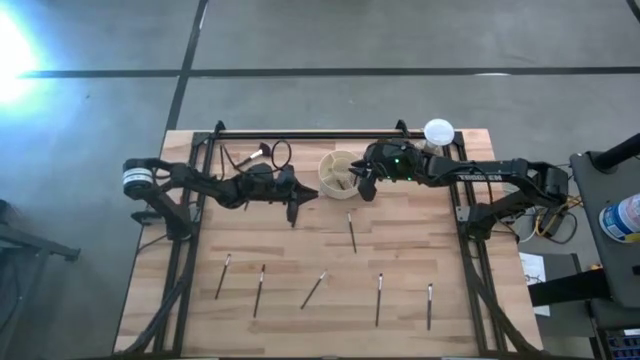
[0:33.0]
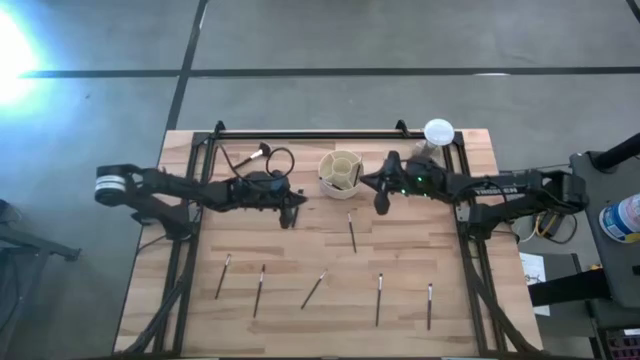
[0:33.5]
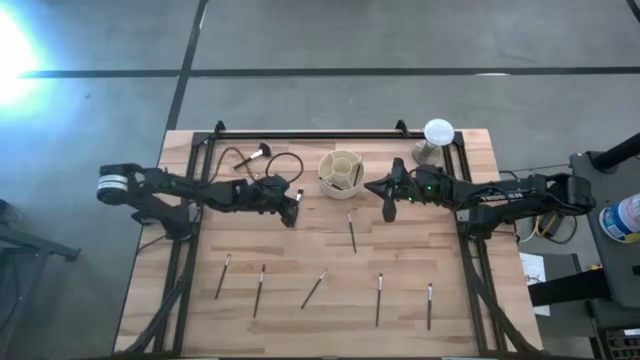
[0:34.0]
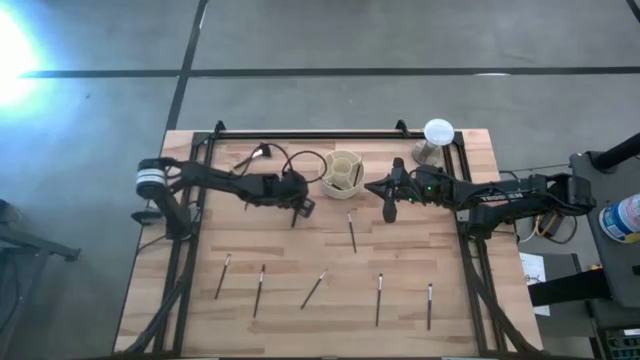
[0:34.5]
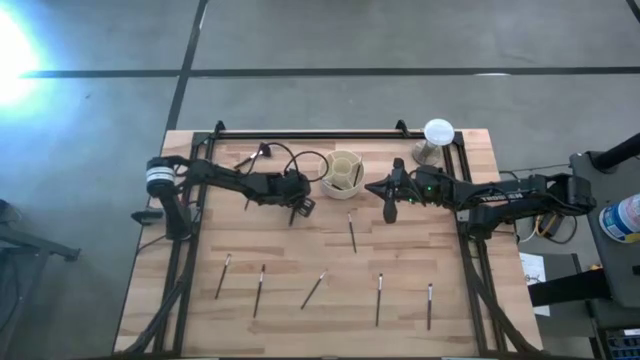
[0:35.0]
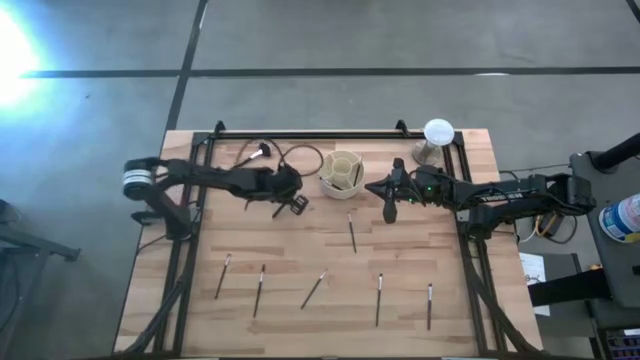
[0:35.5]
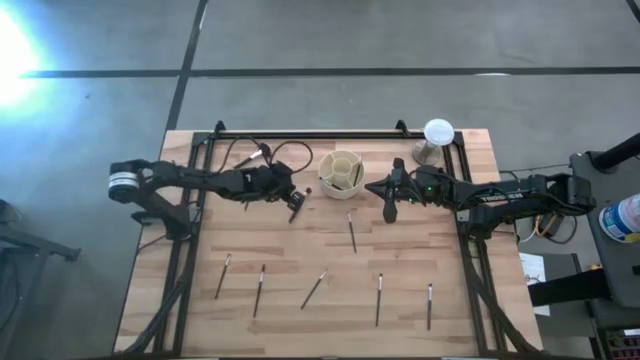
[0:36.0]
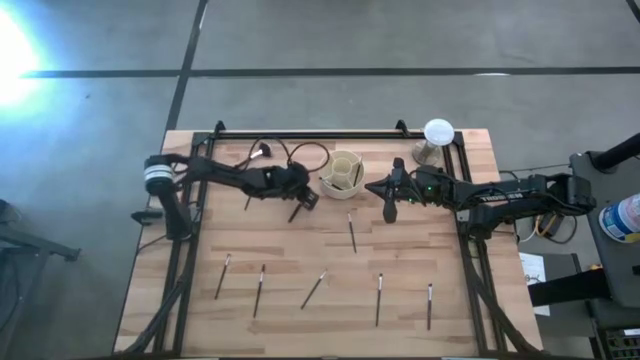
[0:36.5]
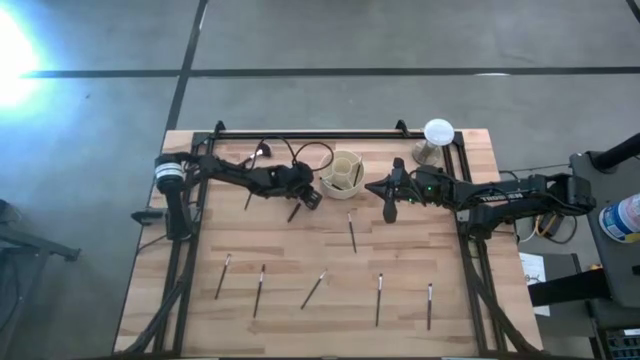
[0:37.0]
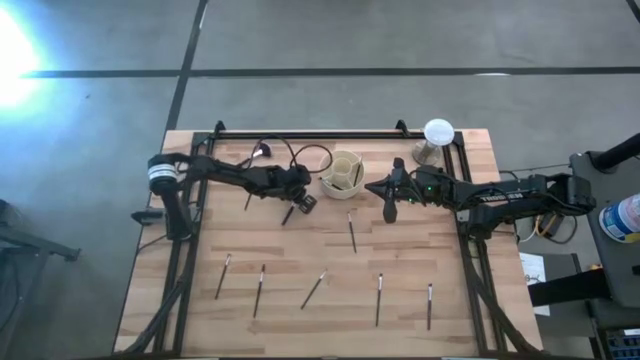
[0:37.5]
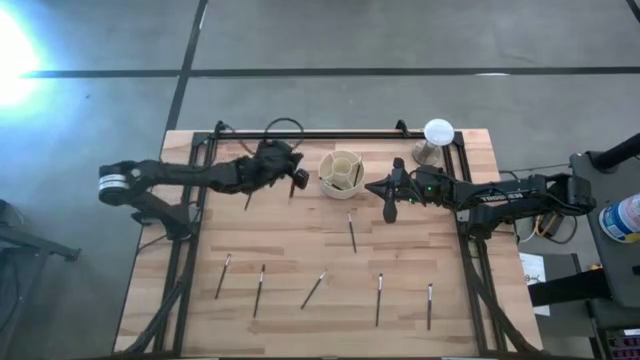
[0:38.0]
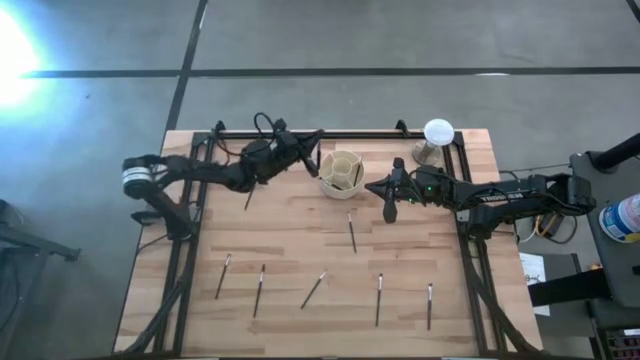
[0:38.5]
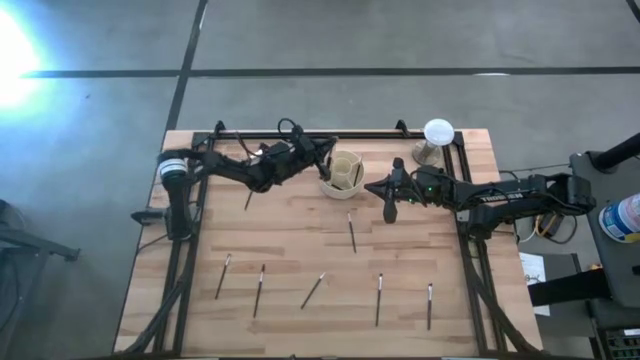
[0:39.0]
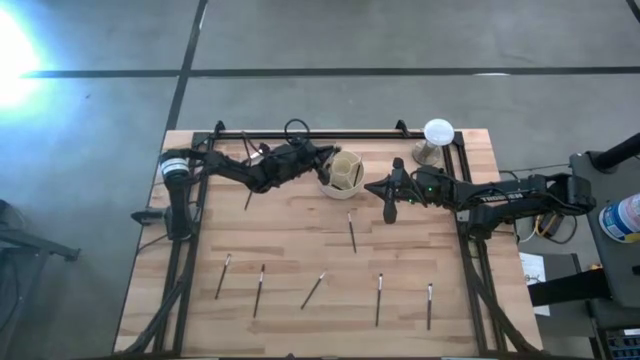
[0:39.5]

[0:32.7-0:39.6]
Task: Put items in baskets/containers
Put the black silver blush brush into the pen organizer

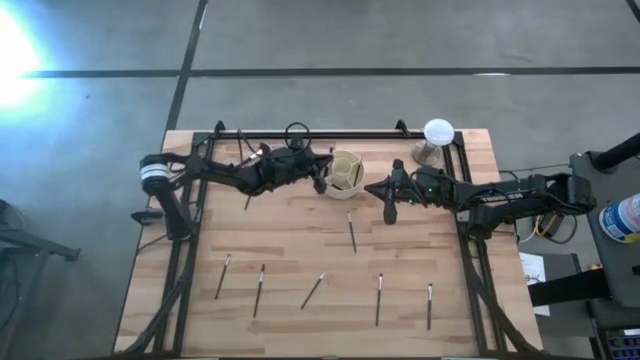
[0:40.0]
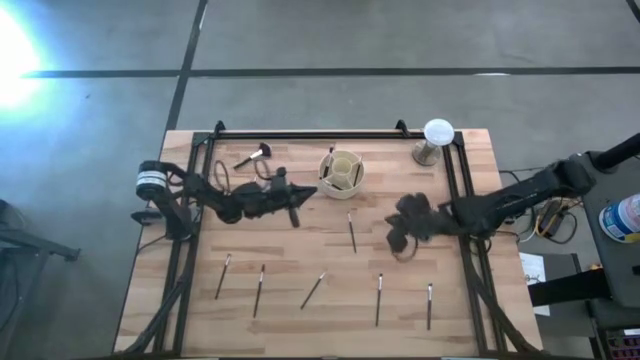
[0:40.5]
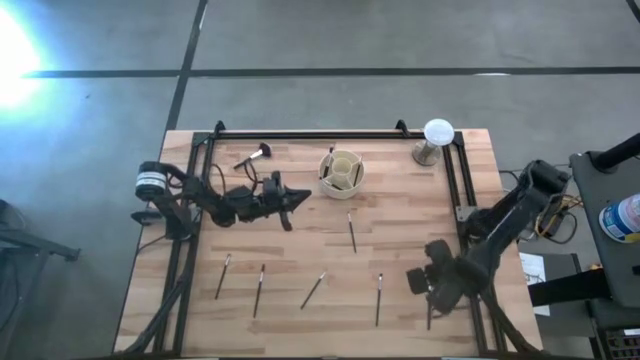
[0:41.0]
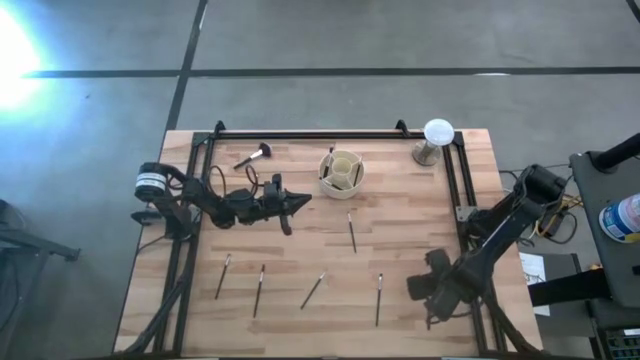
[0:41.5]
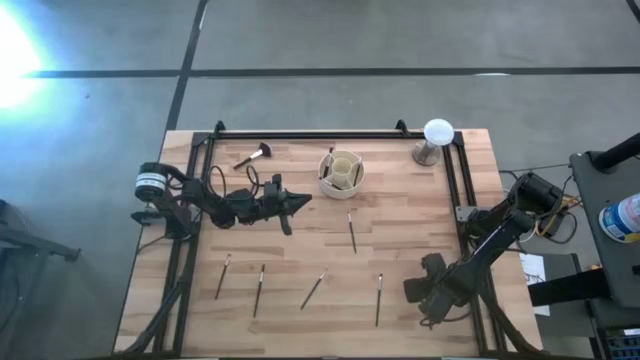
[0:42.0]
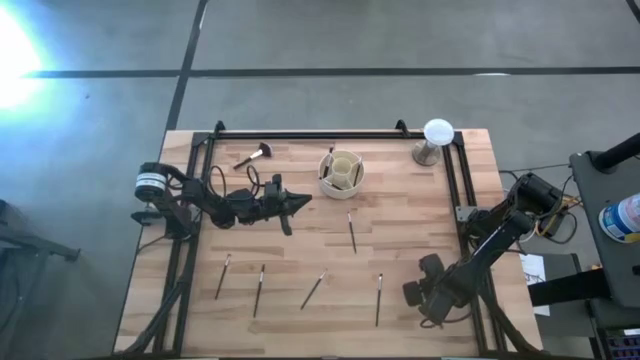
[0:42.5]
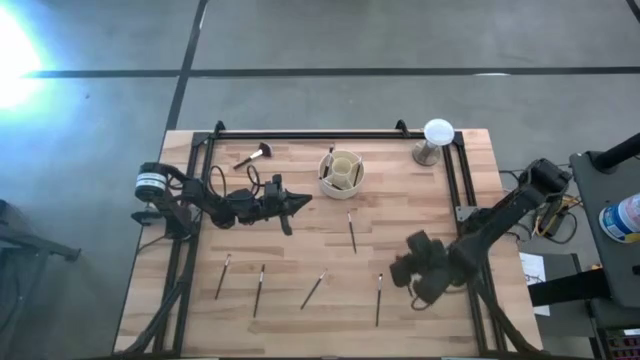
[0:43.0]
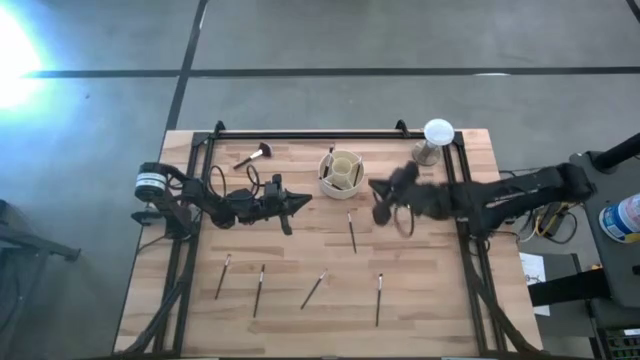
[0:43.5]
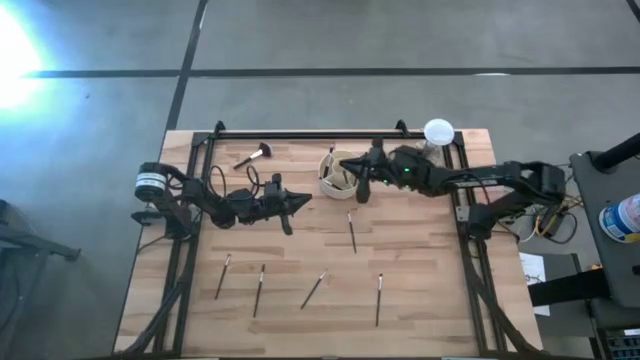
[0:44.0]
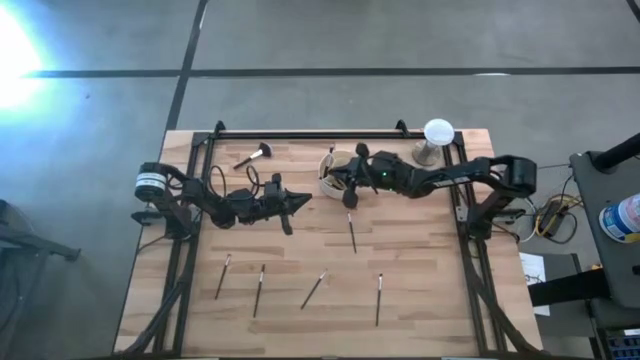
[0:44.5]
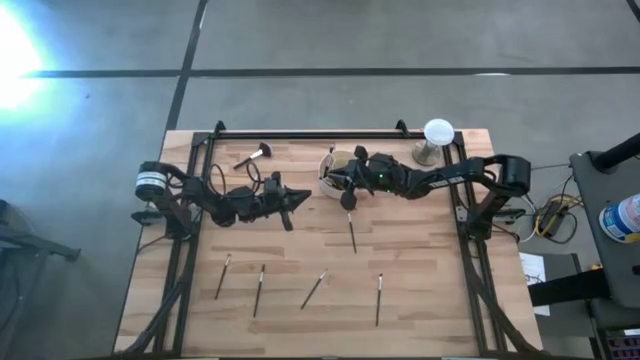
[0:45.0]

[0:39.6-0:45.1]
Put the black silver foundation brush into the pen organizer

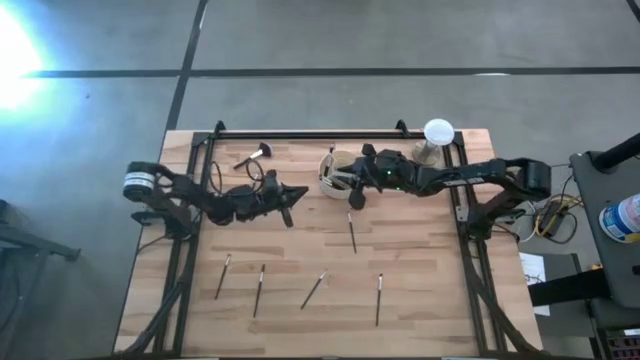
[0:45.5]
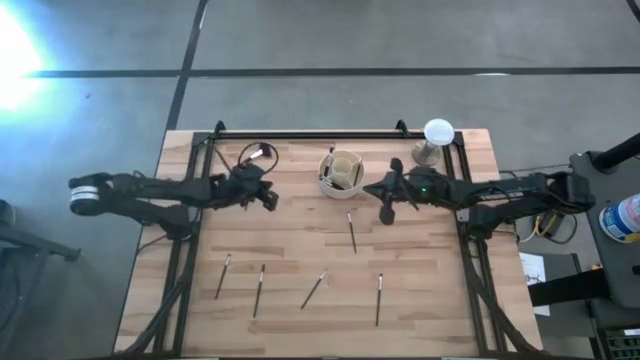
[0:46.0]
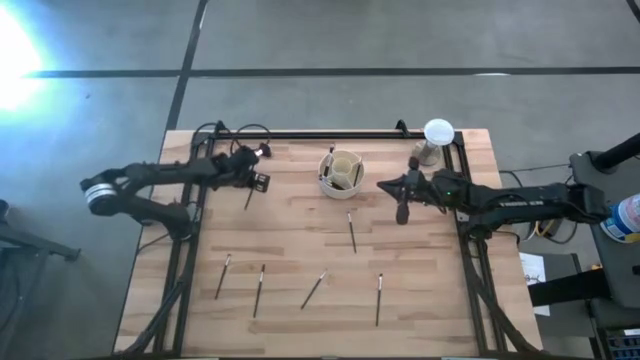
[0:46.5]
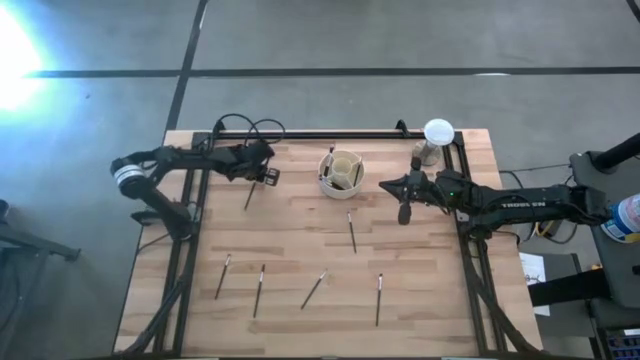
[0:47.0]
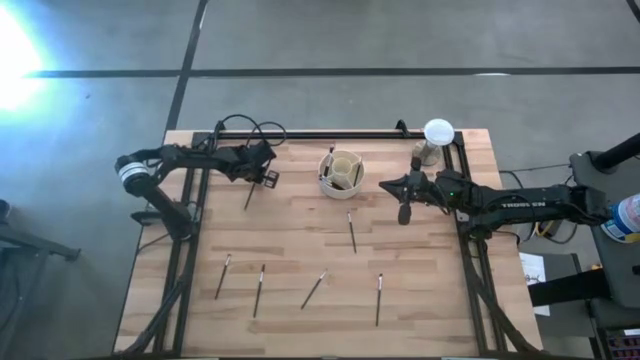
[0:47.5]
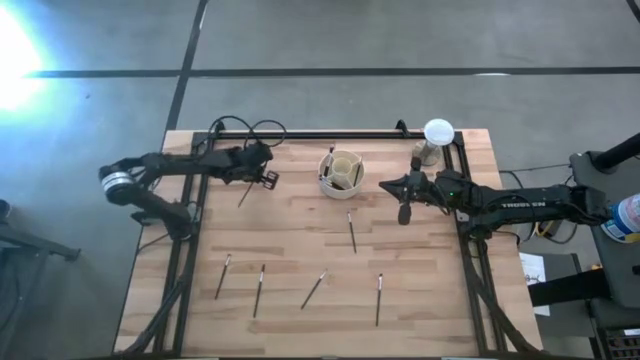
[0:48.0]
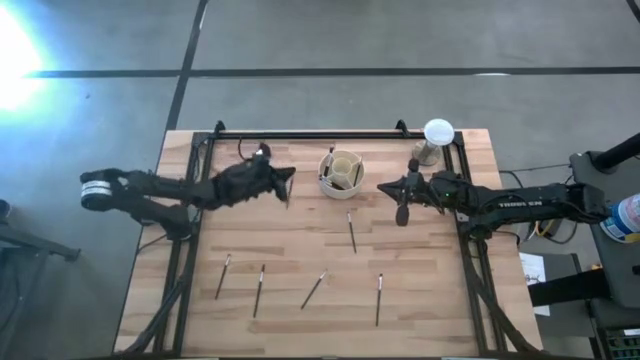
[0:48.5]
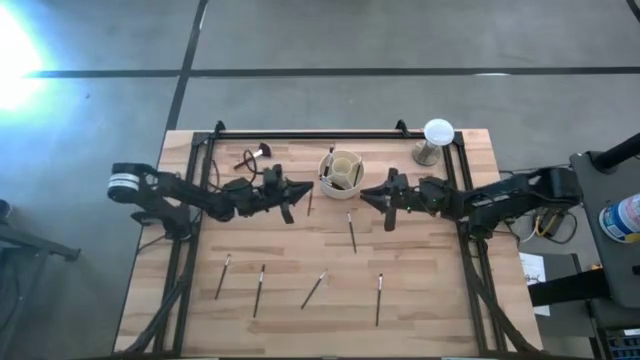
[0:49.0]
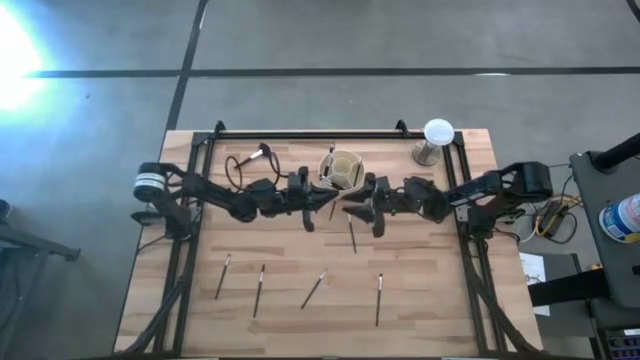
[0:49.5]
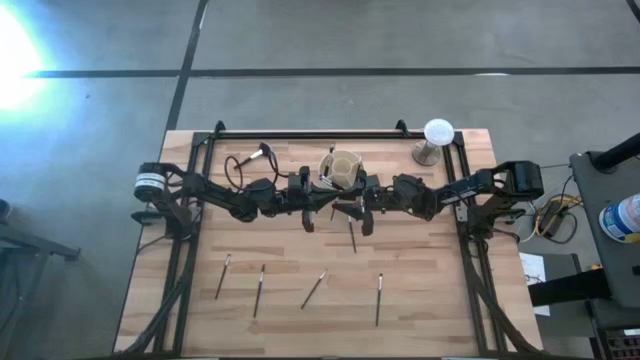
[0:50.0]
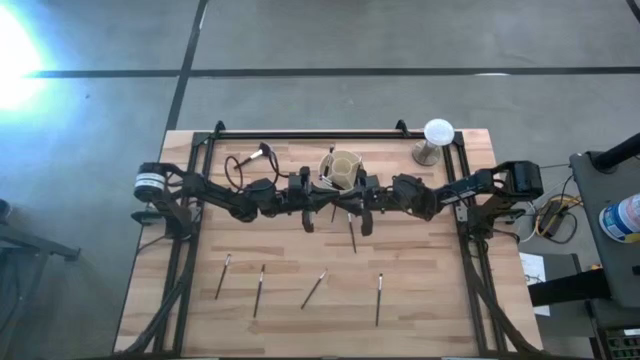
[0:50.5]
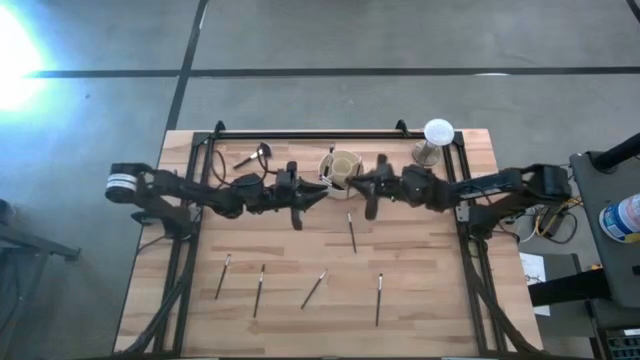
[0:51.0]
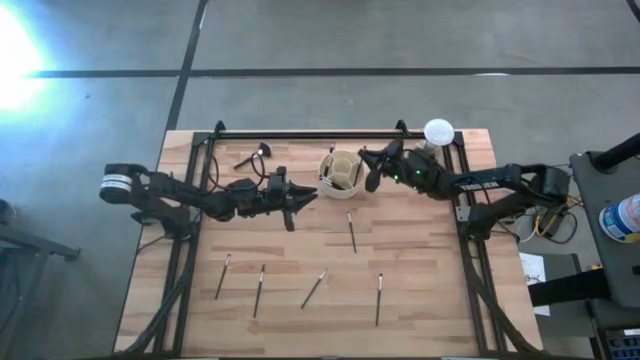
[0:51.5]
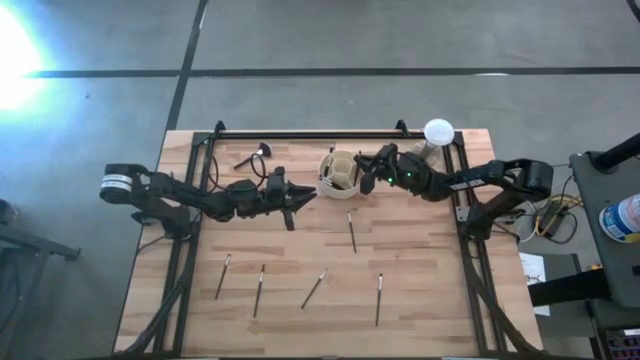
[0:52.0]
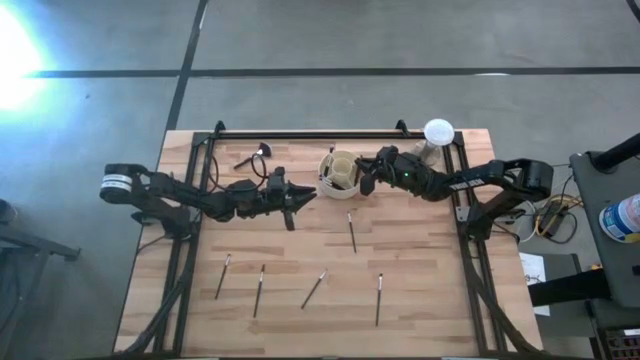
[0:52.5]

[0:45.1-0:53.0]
Put the black silver eyeshadow brush into the pen organizer

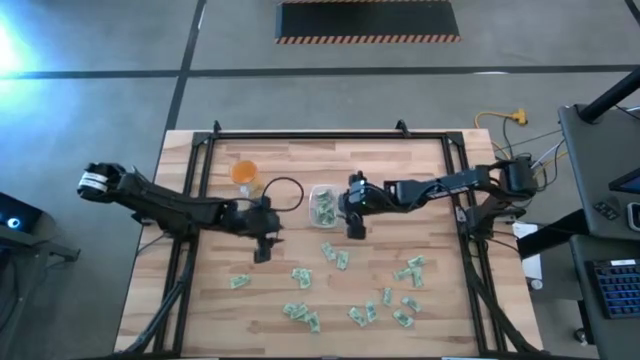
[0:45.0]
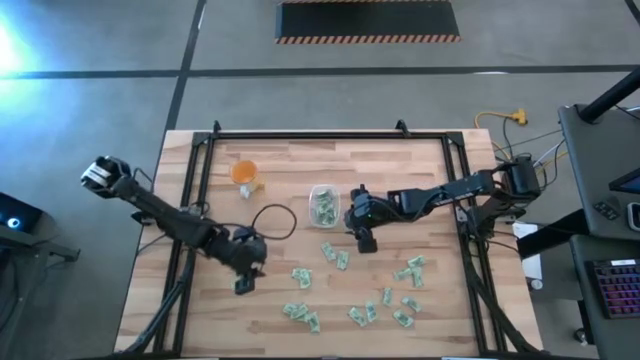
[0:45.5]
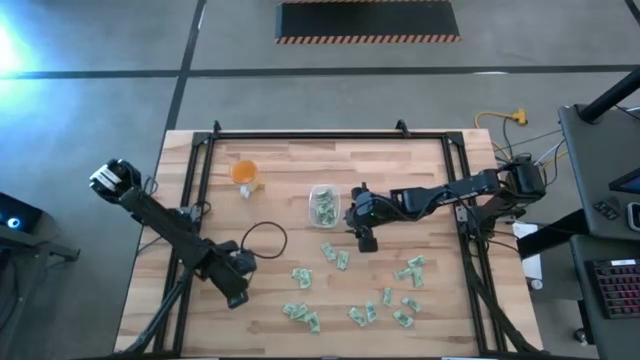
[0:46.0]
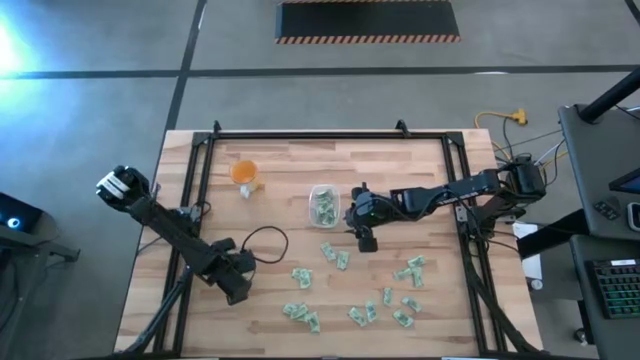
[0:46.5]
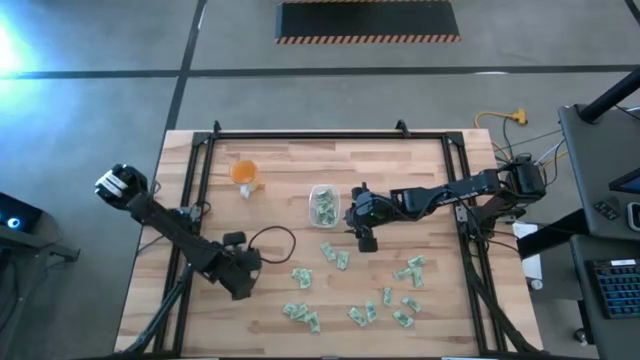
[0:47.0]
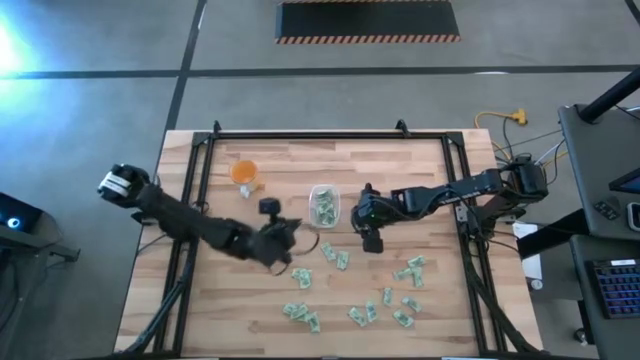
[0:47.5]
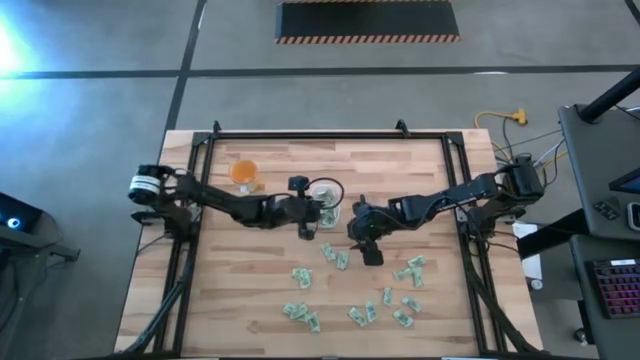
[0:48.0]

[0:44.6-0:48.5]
Task: Pick and place Stevia / Truvia into bins
Put the stevia packet into the bin
